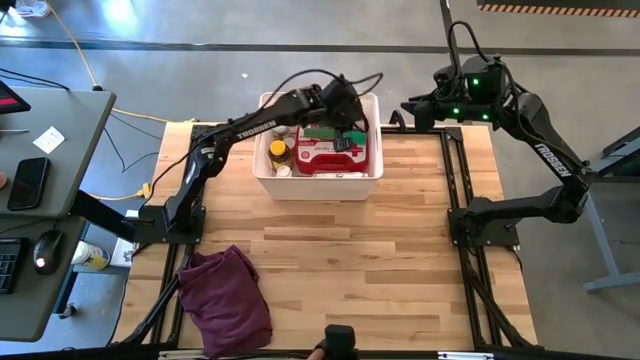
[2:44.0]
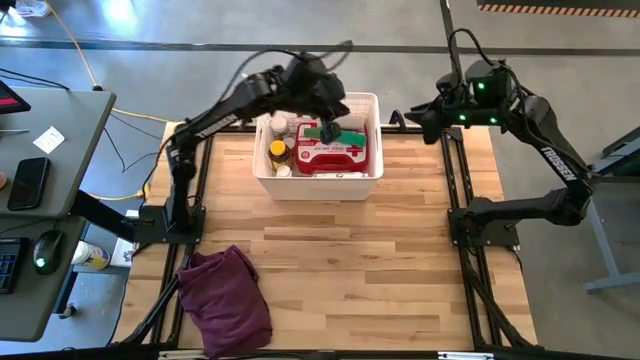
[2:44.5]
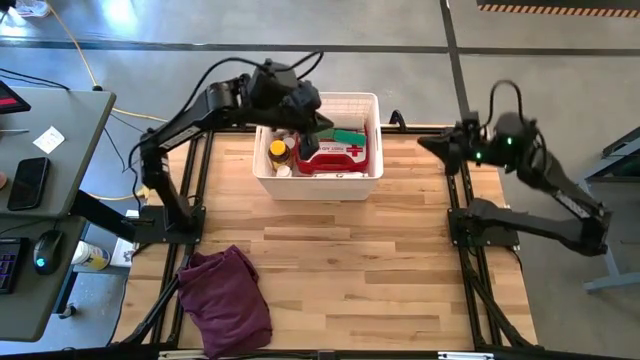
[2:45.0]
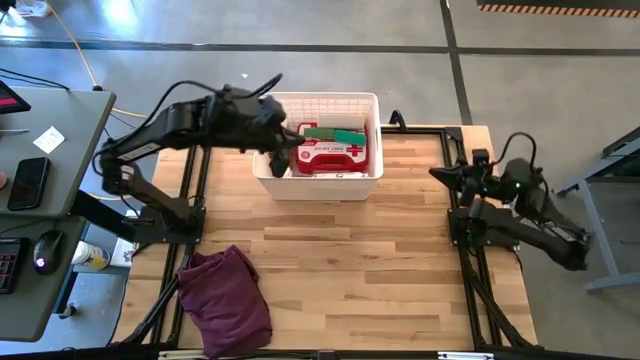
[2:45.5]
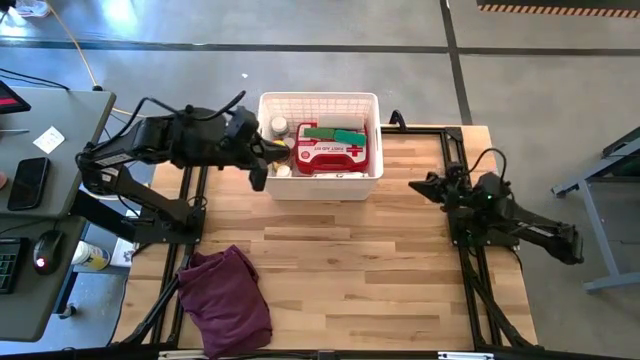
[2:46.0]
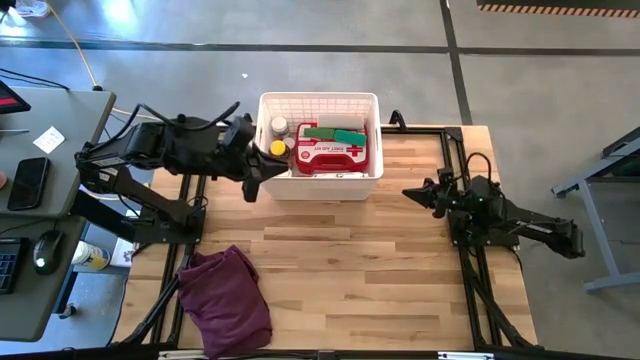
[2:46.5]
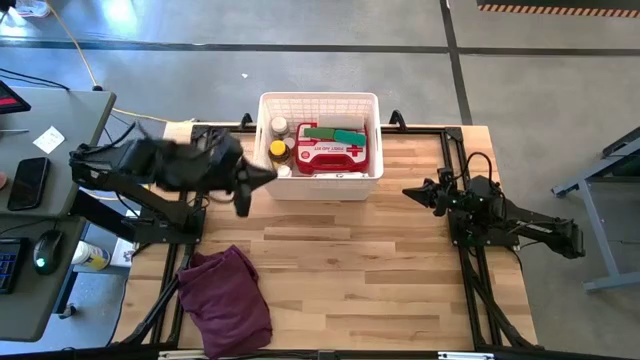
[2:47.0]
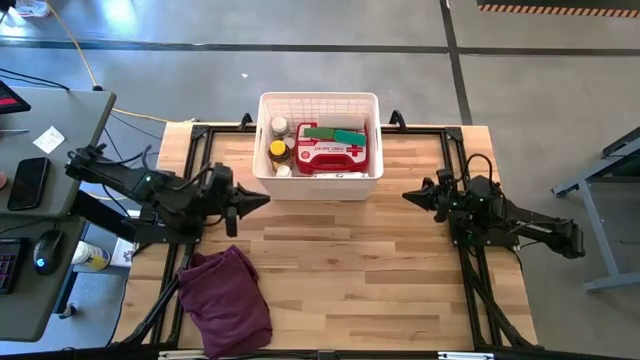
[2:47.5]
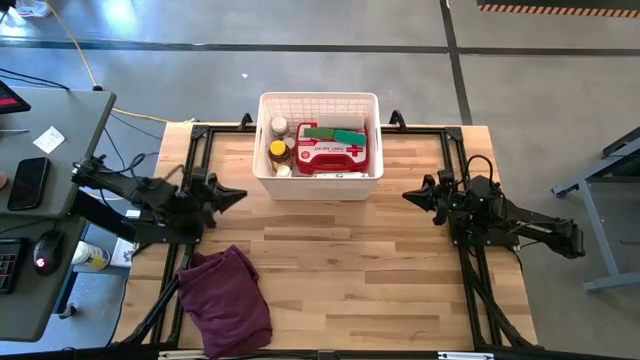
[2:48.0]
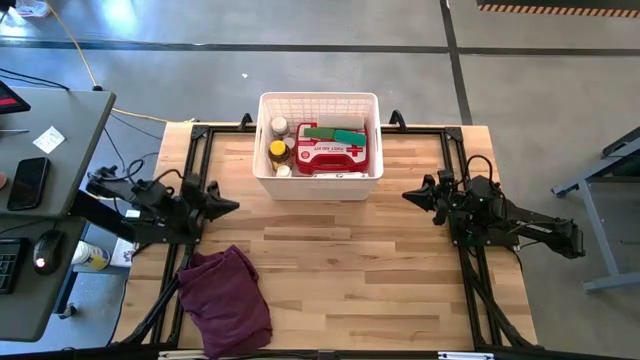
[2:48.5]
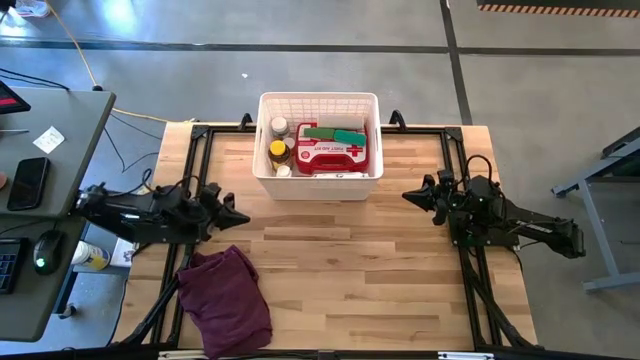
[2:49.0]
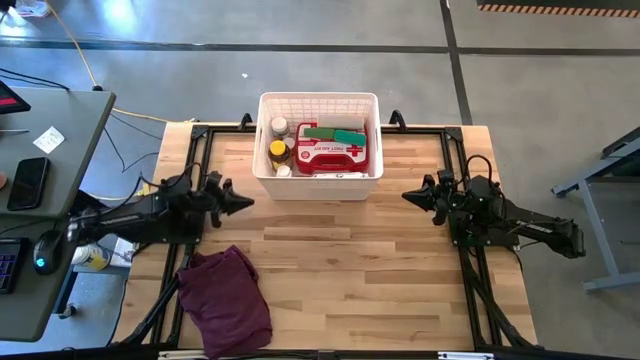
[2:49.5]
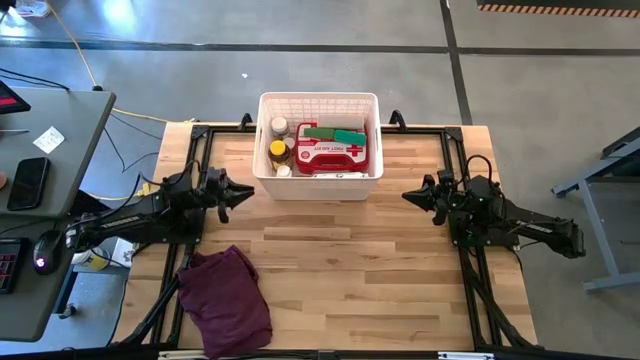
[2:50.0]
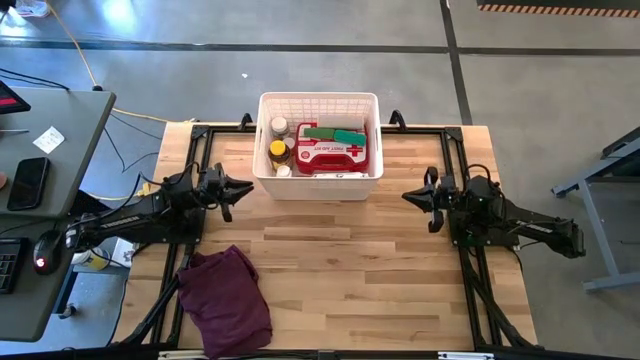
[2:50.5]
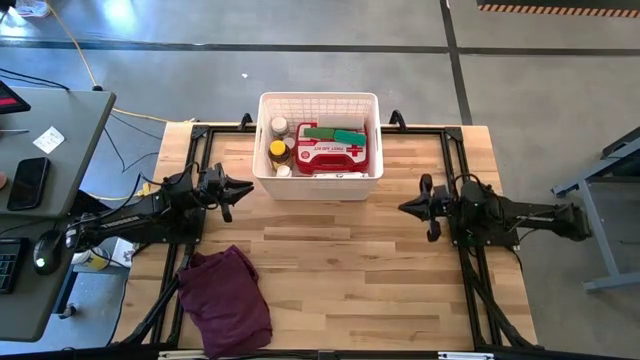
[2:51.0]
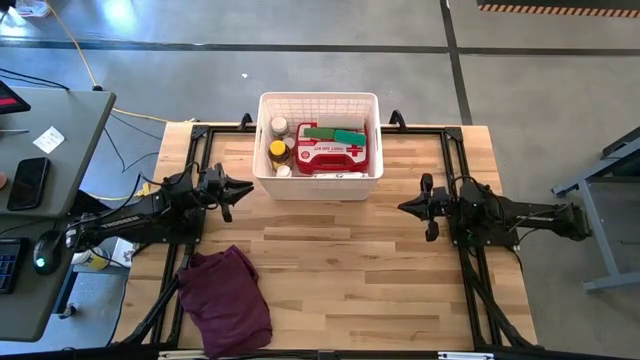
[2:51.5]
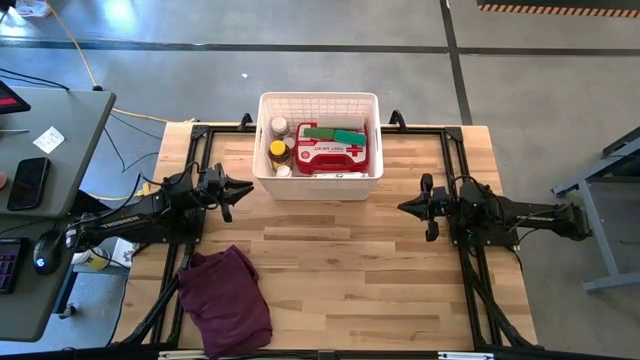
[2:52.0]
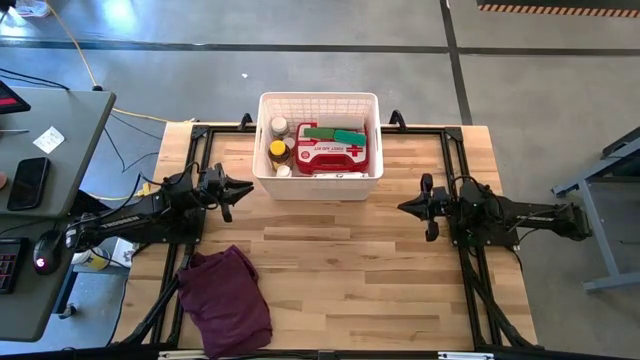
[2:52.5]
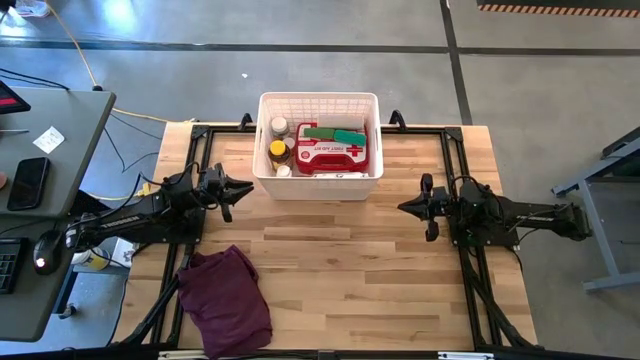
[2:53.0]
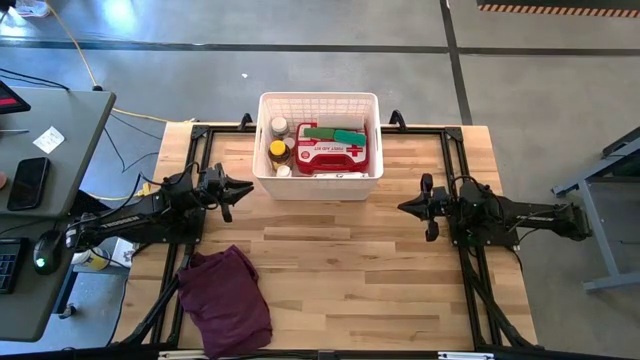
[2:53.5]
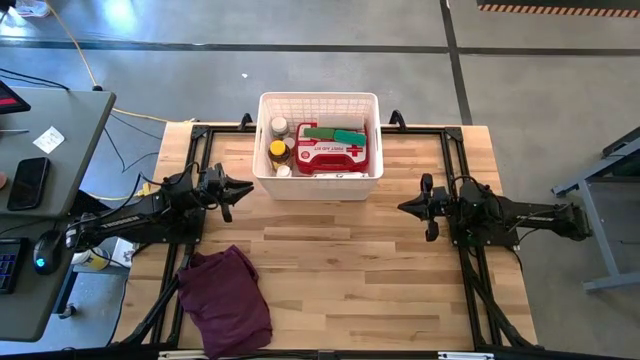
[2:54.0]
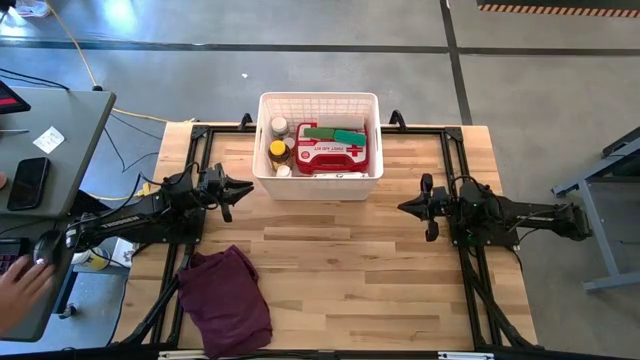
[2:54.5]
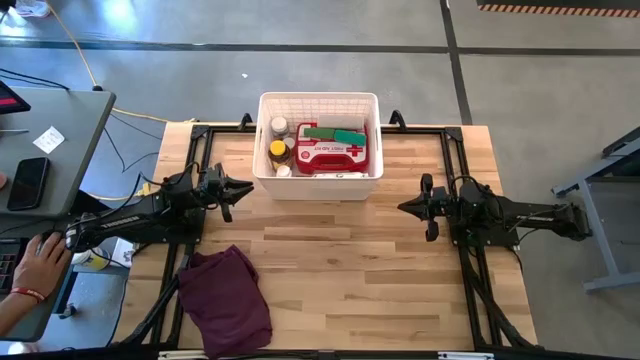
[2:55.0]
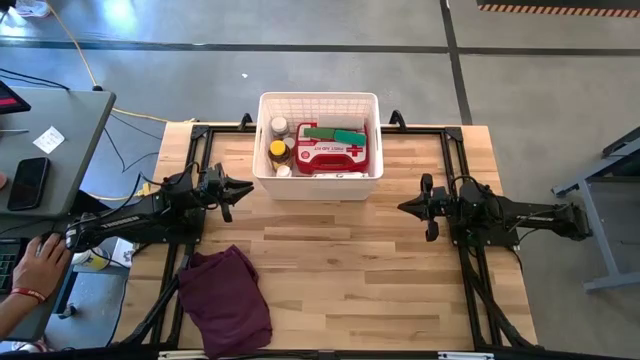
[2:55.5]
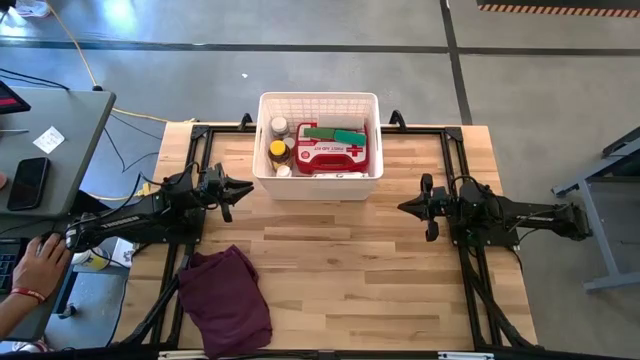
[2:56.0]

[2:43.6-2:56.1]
Task: Pick & place medical supplies in basket/bin
Return To Home Position

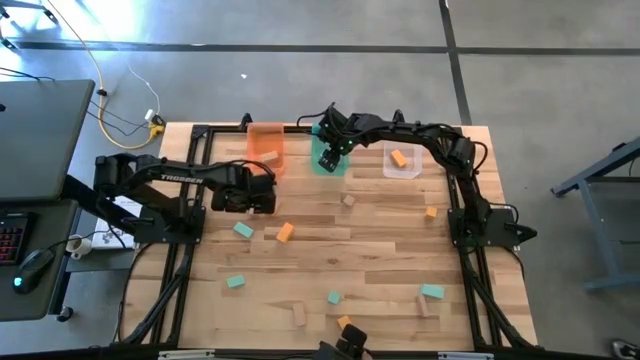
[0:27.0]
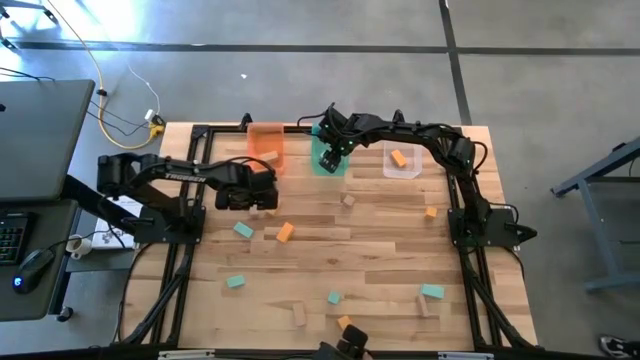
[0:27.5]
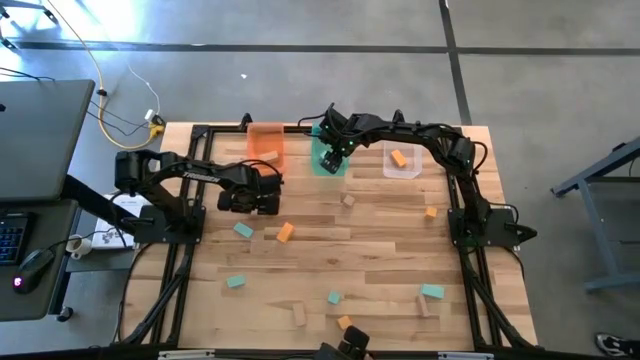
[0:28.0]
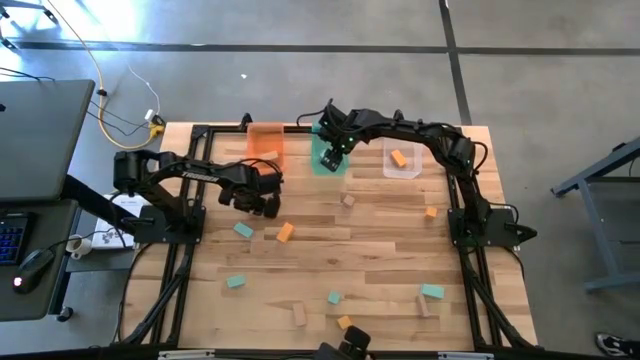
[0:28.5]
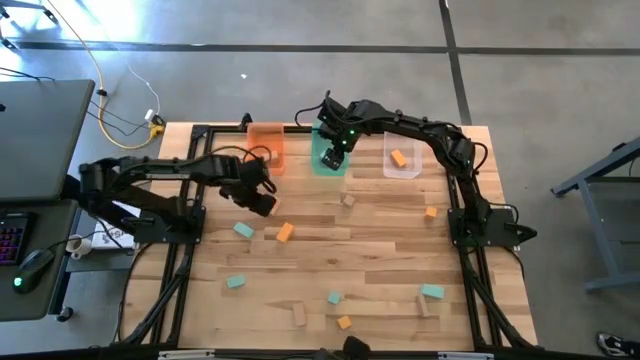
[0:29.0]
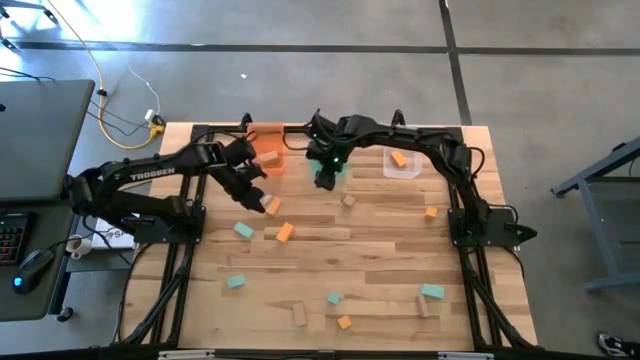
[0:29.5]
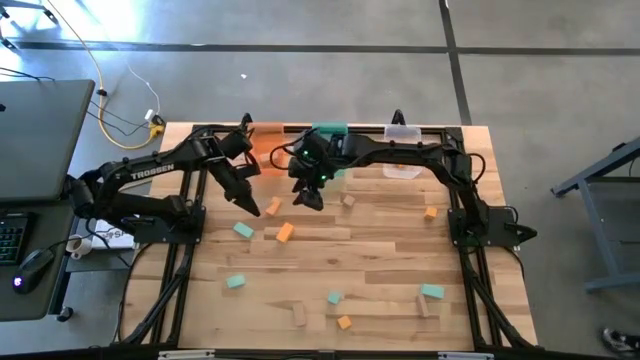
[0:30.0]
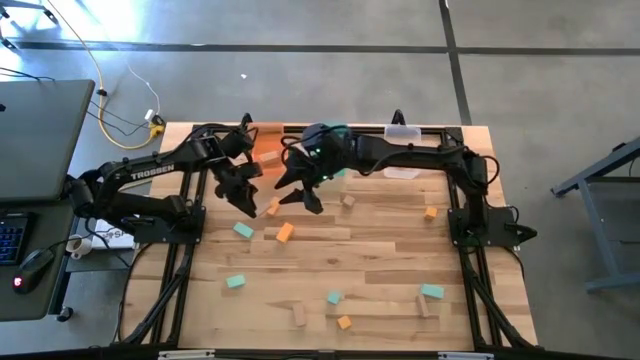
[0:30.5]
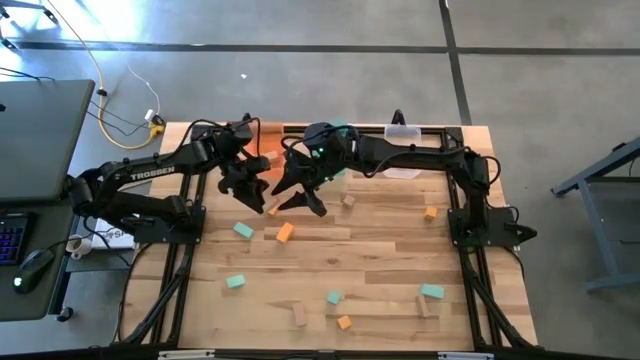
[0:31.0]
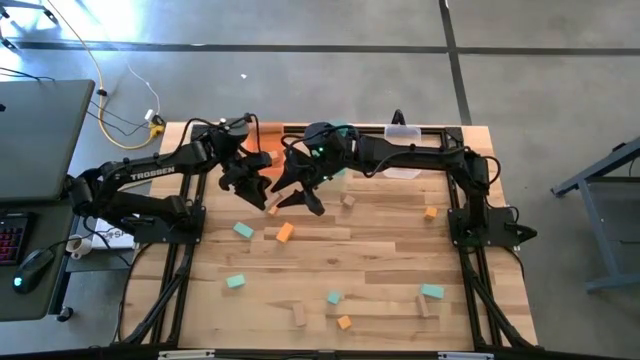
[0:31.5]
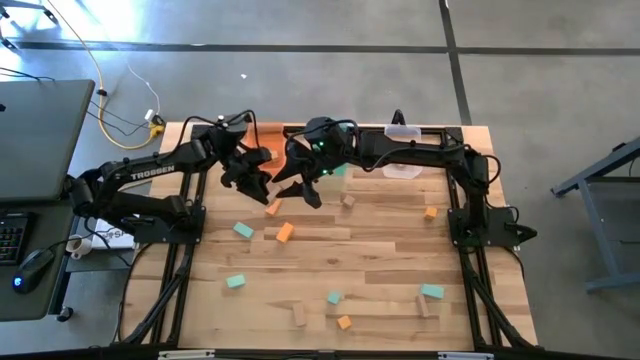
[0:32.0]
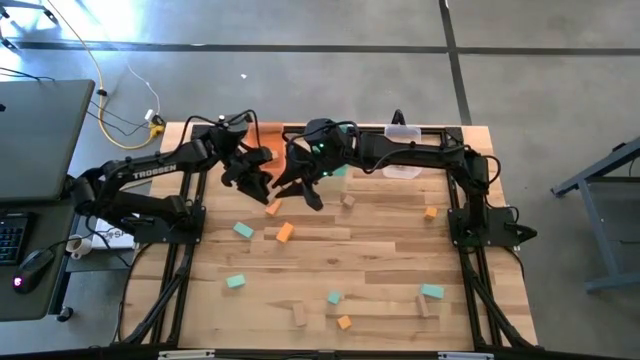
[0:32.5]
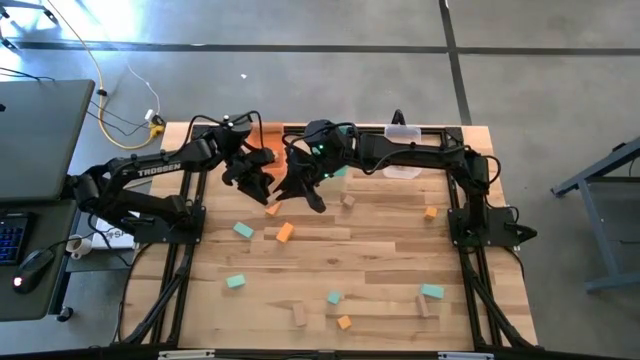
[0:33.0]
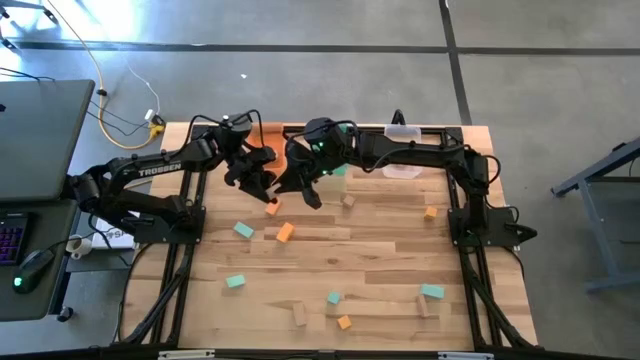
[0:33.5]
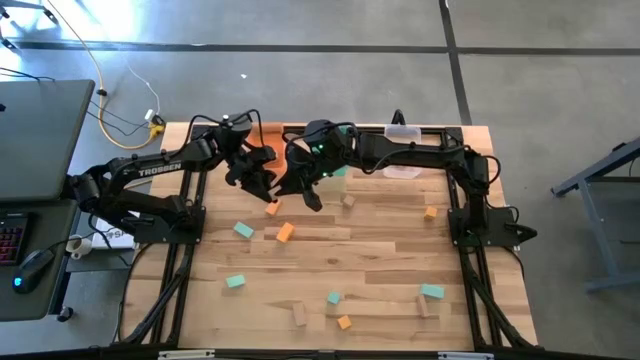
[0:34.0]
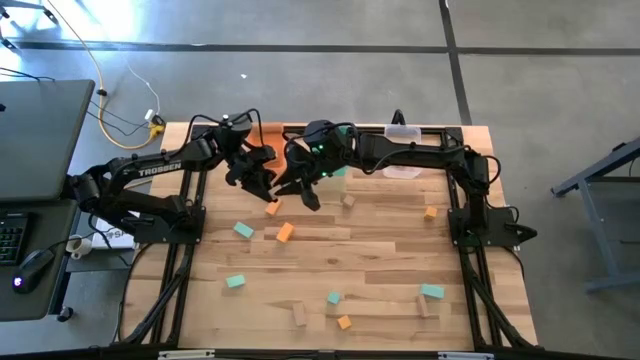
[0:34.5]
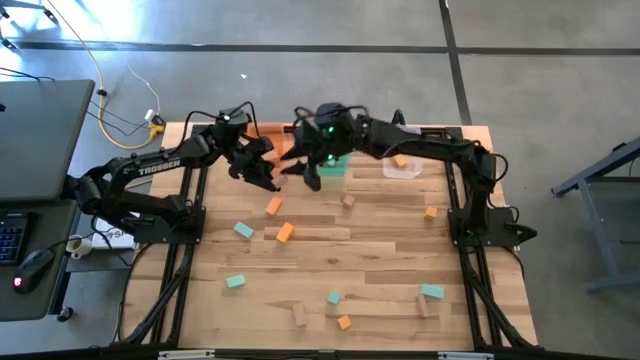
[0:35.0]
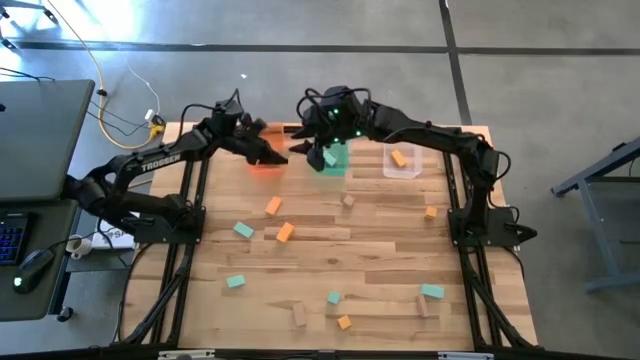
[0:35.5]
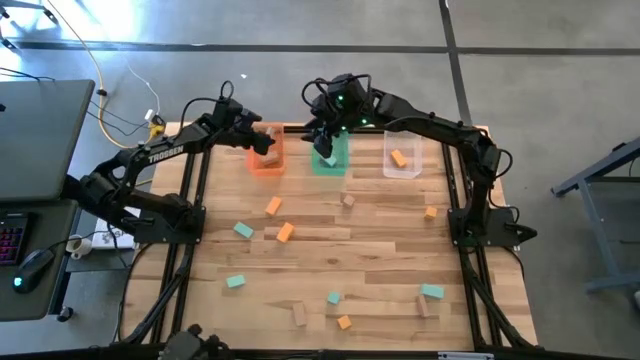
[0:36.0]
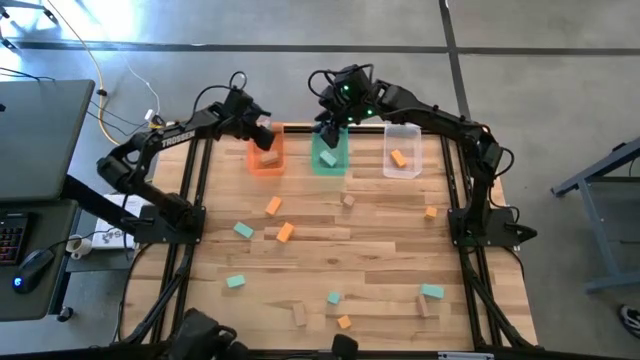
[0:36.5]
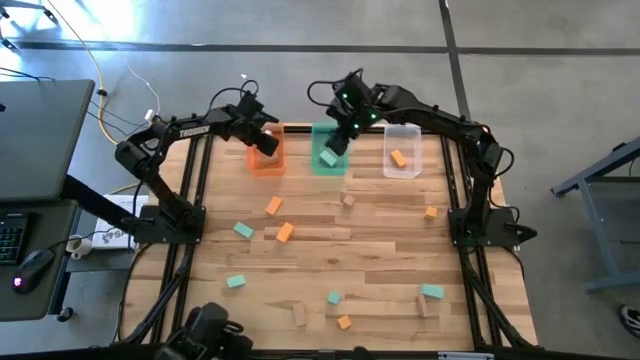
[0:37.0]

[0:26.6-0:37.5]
Task: Sort & place blocks by color
Put the brown block into the orange bin
